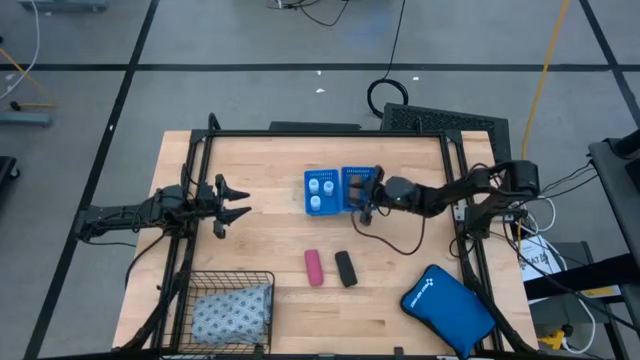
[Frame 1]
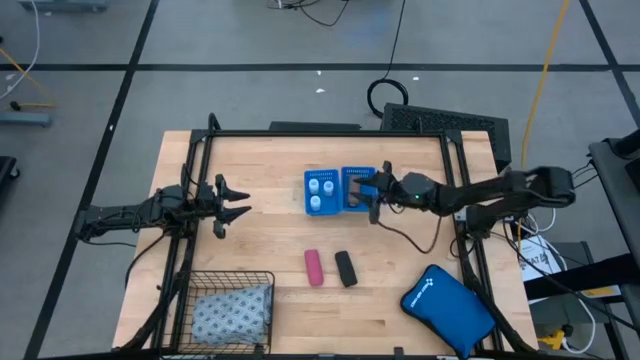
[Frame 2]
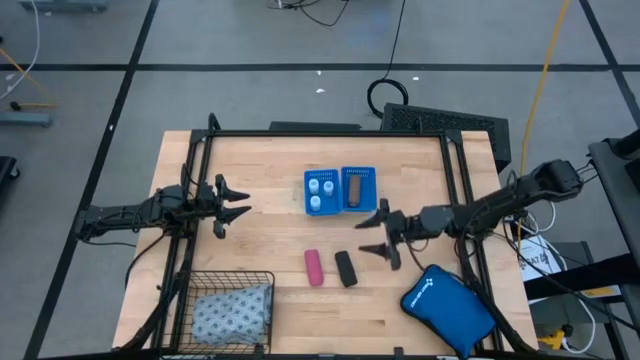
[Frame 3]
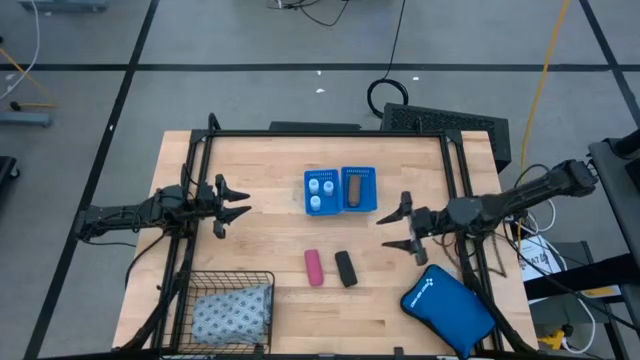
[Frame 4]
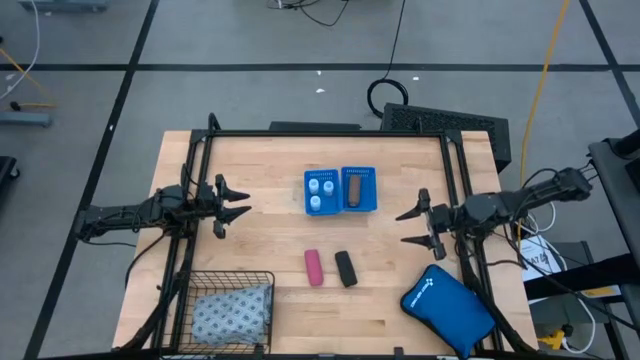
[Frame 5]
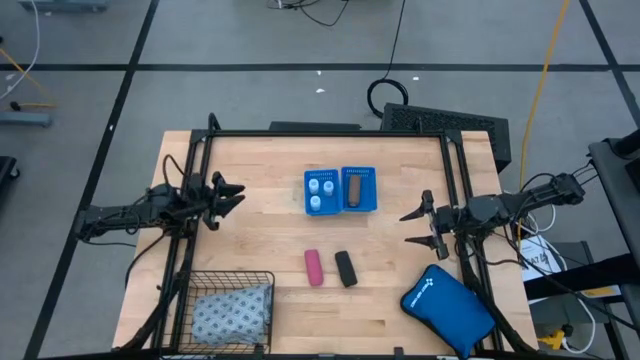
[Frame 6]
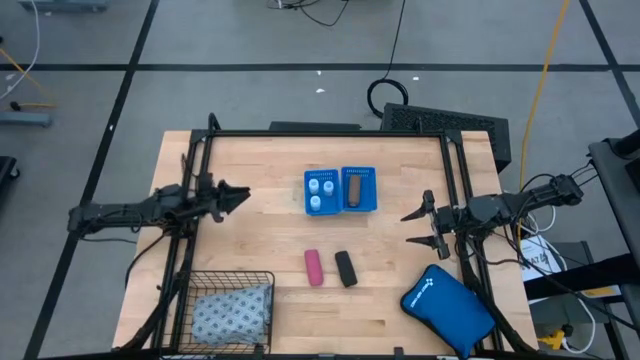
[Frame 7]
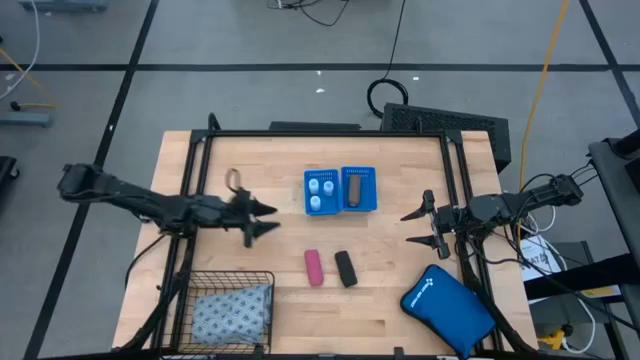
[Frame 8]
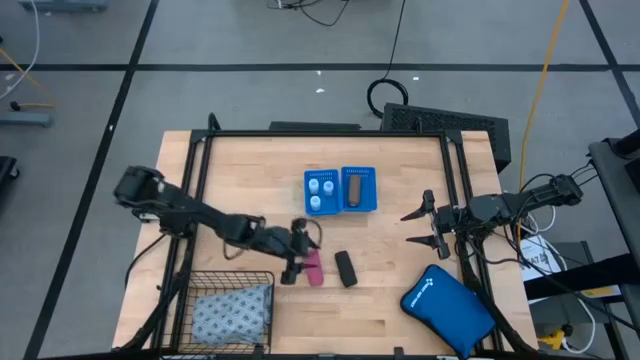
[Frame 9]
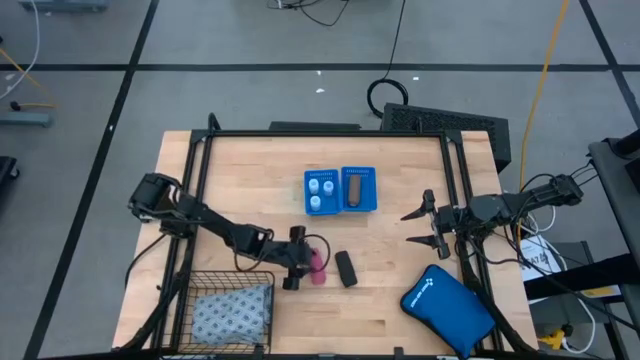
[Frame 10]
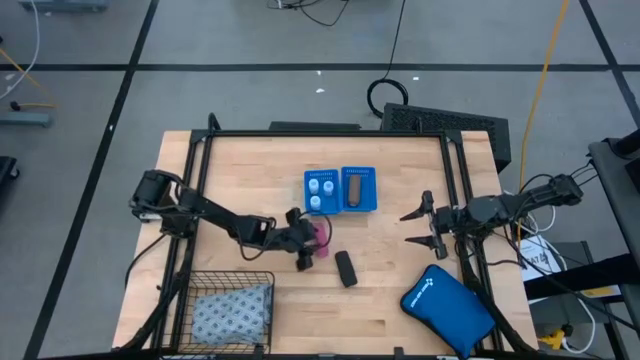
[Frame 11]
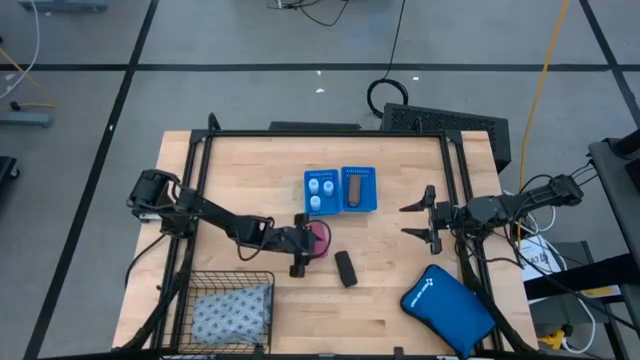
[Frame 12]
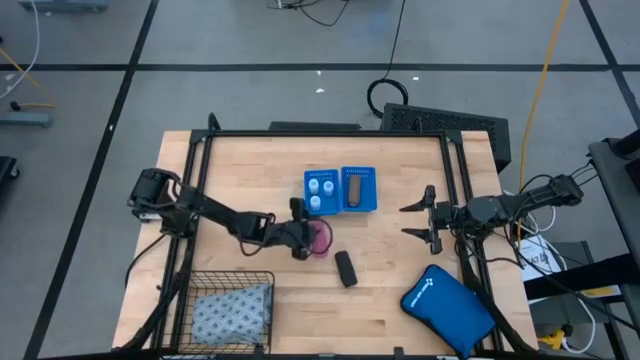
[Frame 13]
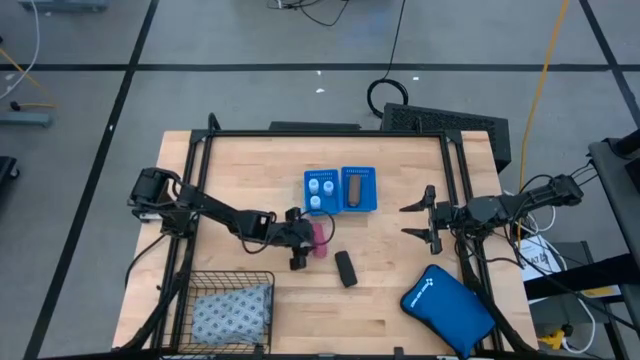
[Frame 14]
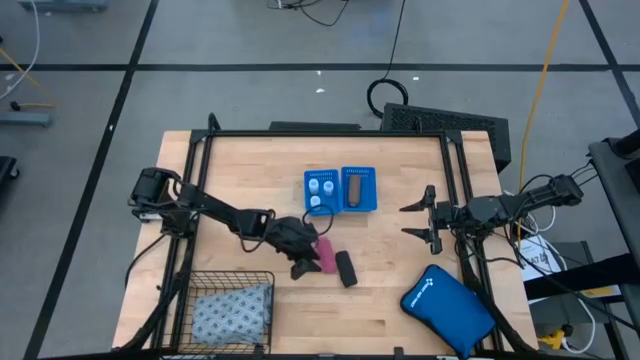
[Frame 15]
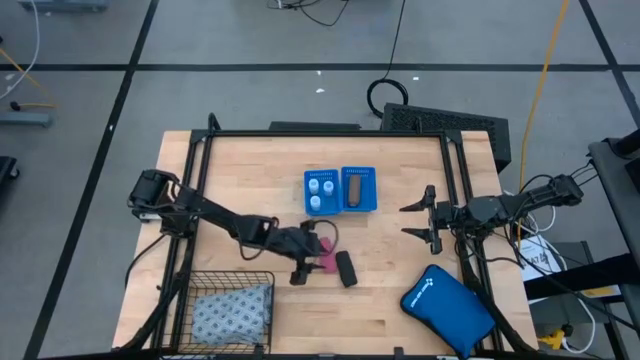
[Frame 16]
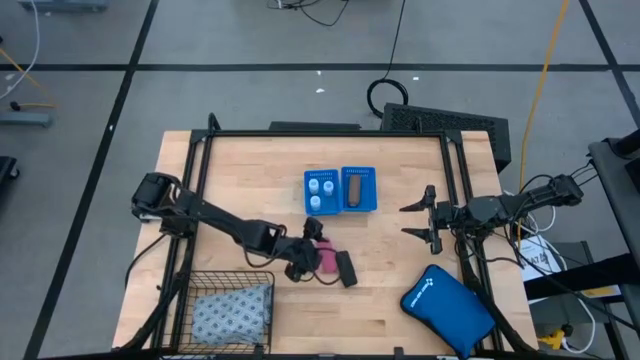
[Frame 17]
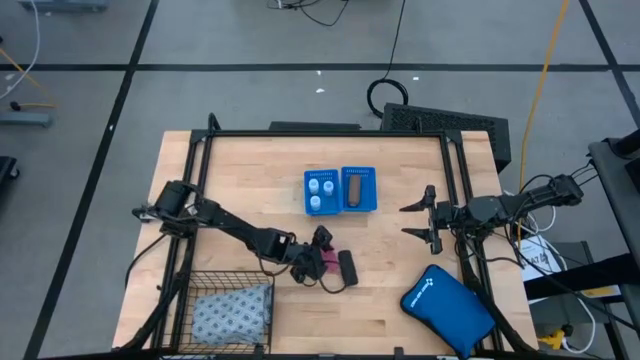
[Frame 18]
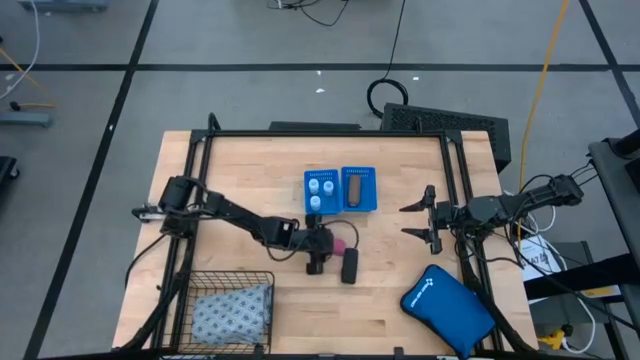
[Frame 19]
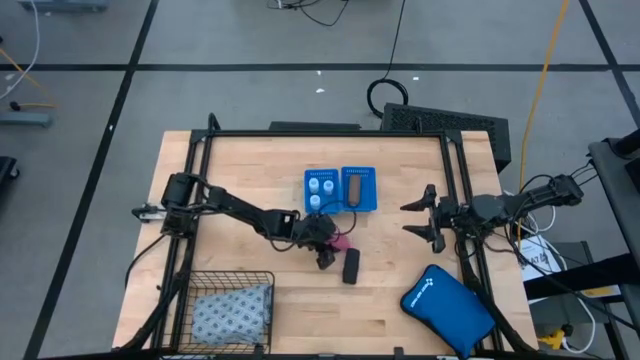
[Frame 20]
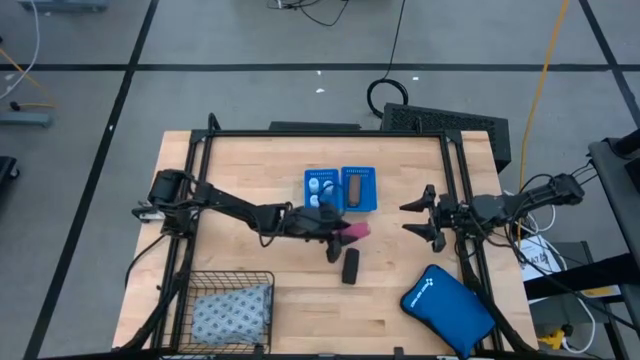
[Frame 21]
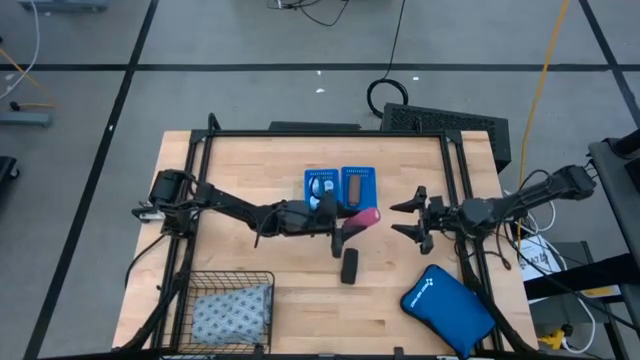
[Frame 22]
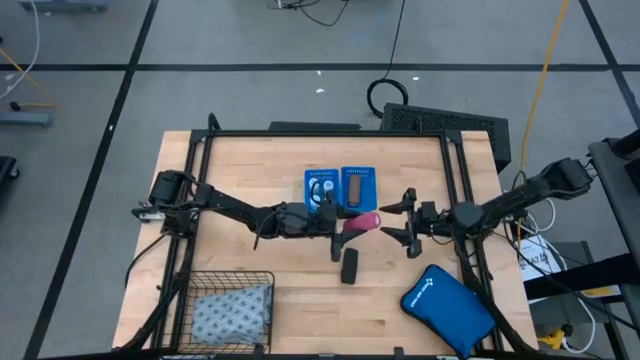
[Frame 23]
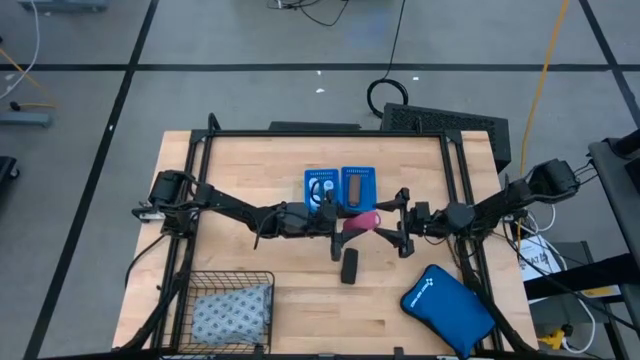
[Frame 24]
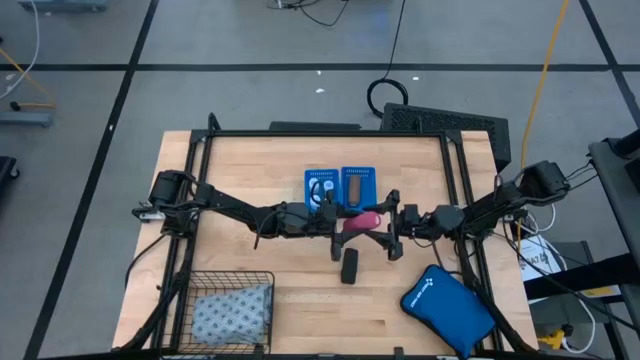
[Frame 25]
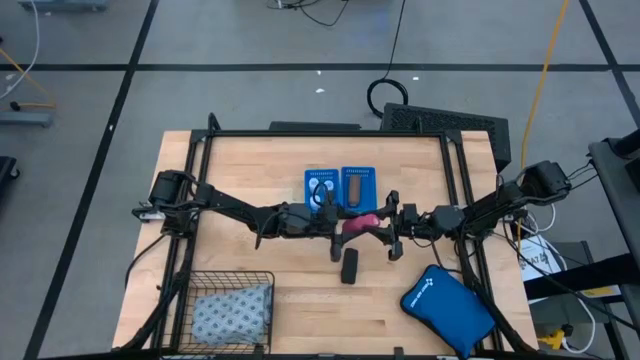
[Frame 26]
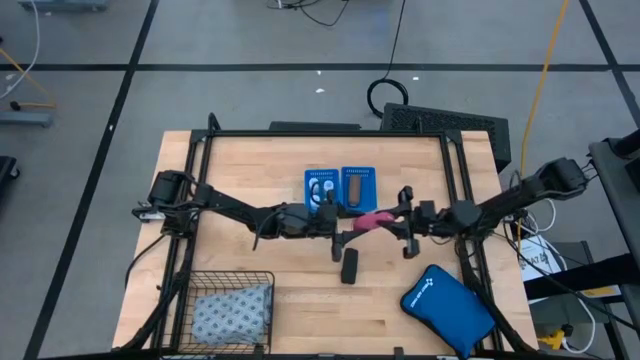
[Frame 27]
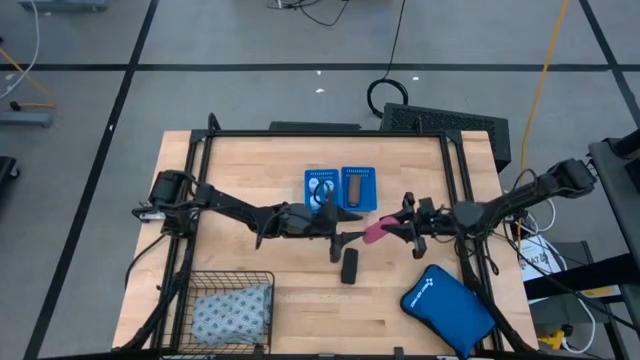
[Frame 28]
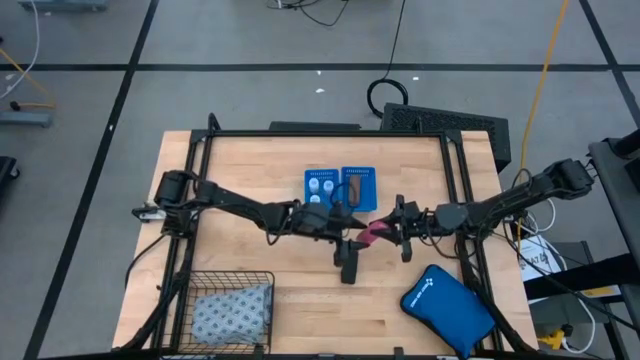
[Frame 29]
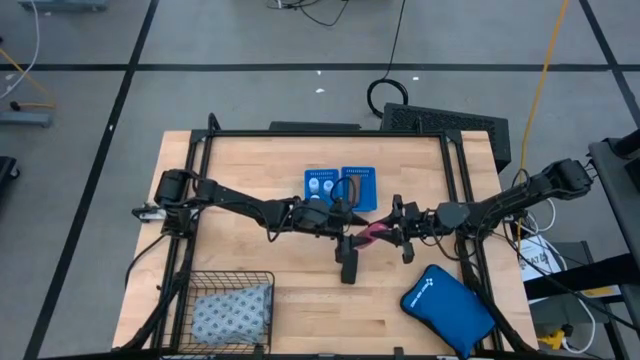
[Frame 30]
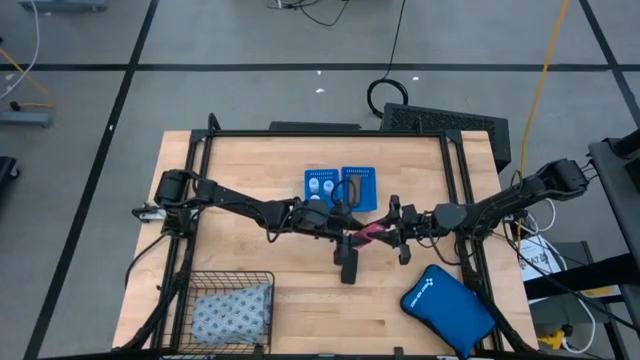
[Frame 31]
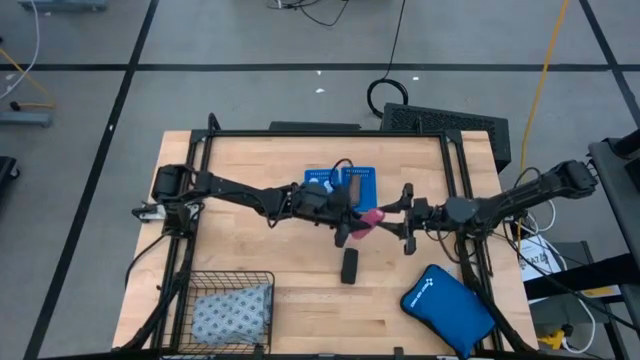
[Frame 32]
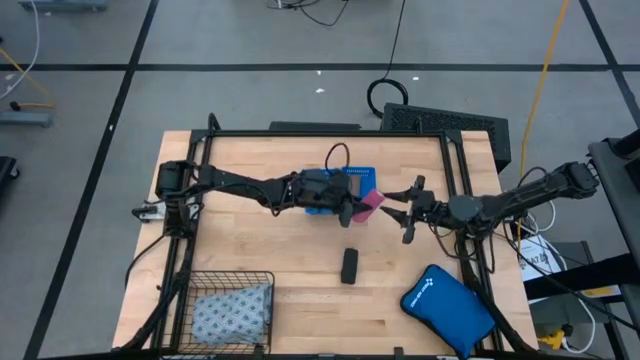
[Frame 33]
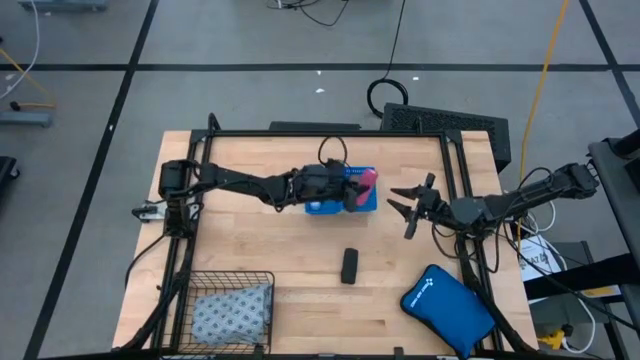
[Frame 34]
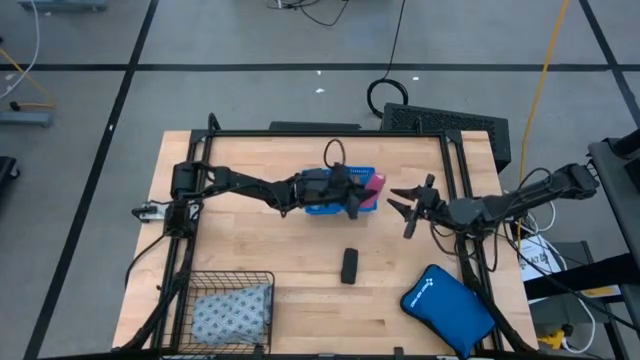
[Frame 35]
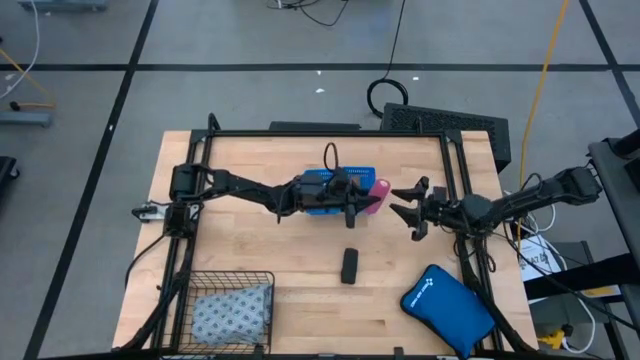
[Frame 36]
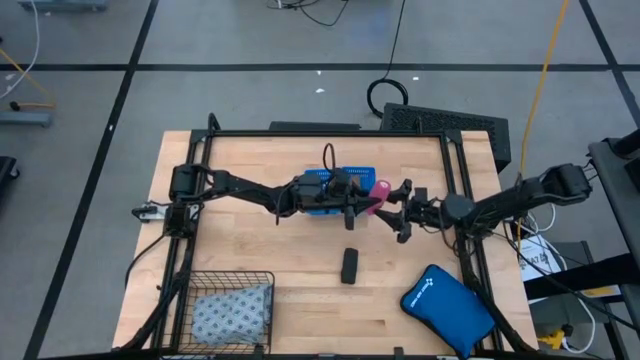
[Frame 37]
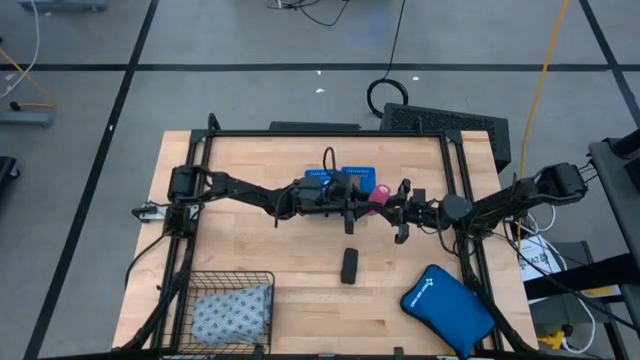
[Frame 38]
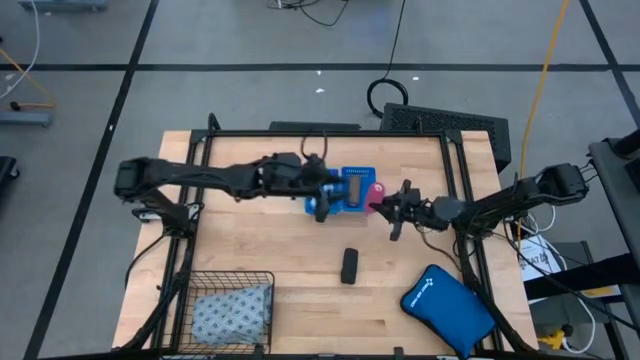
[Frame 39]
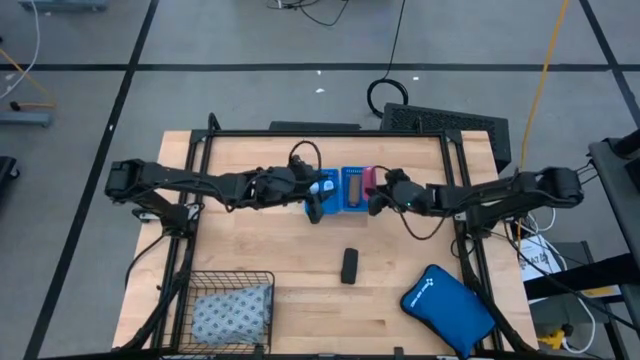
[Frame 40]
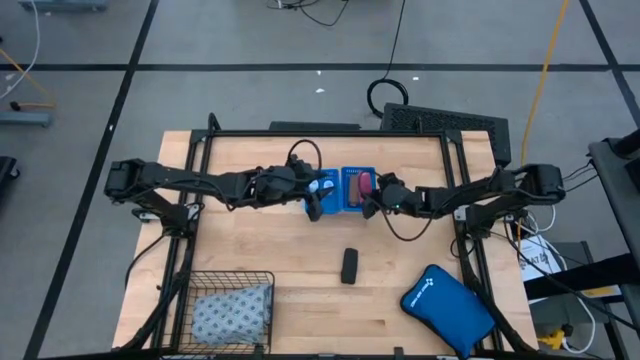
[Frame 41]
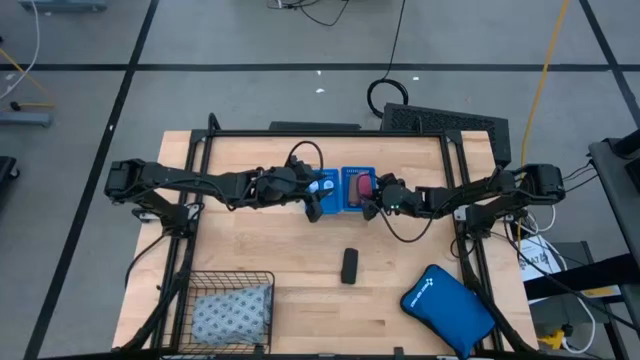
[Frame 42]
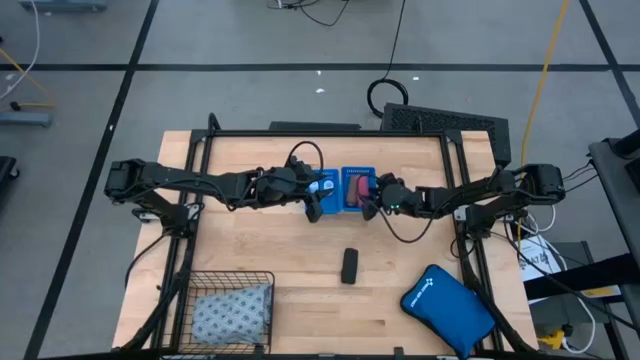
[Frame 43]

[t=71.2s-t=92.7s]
Task: Pick & place medical supplies in basket/bin
Put the pink bandage into the right blue bin
